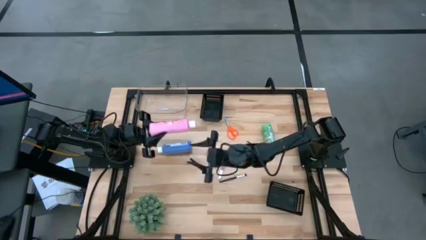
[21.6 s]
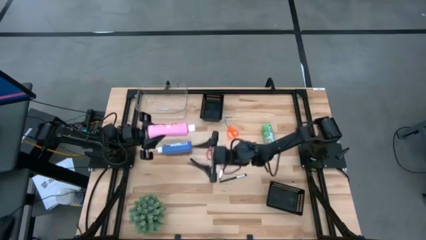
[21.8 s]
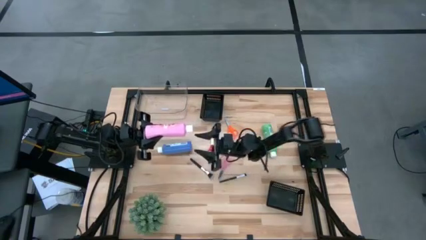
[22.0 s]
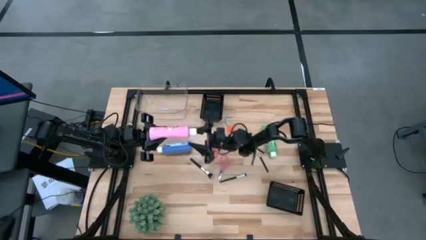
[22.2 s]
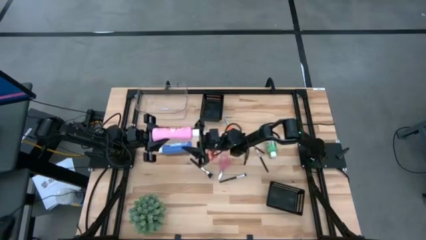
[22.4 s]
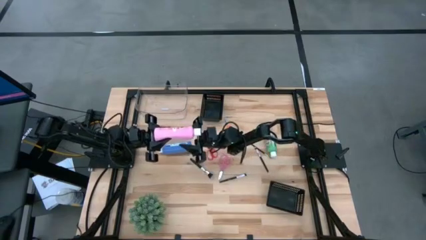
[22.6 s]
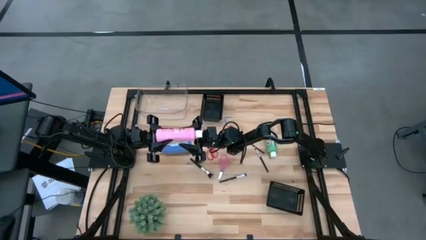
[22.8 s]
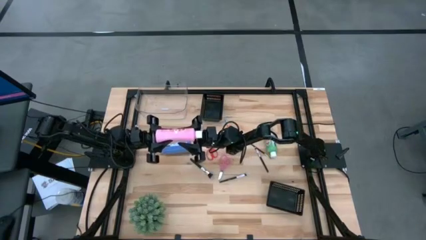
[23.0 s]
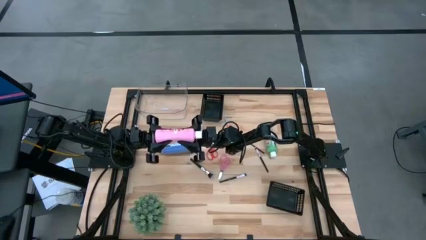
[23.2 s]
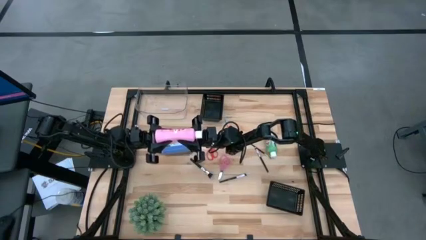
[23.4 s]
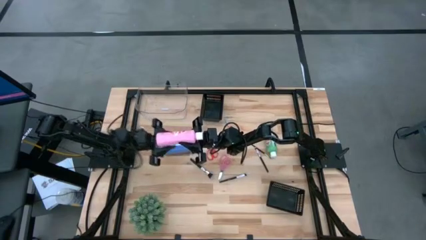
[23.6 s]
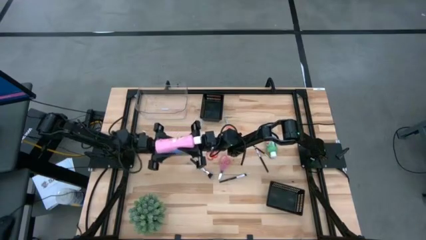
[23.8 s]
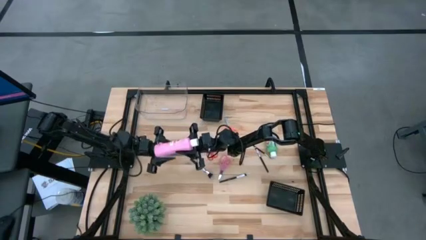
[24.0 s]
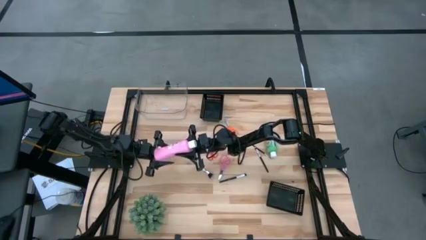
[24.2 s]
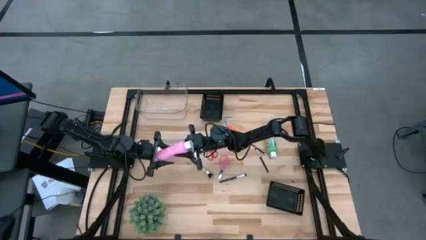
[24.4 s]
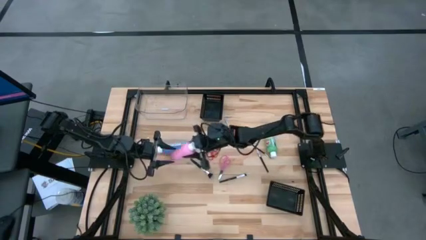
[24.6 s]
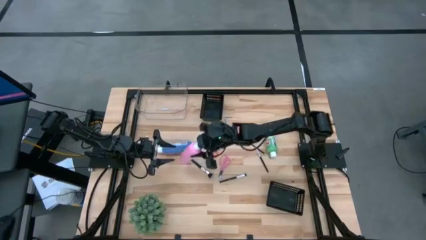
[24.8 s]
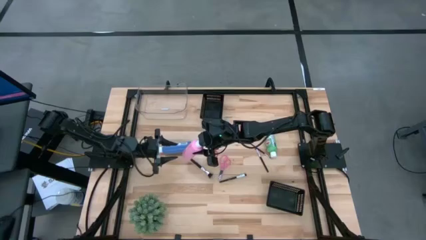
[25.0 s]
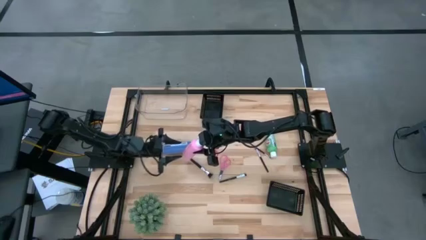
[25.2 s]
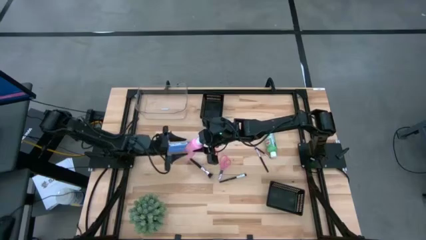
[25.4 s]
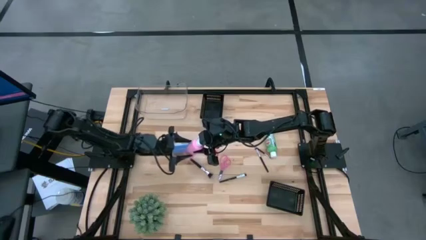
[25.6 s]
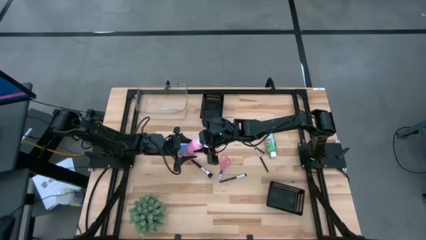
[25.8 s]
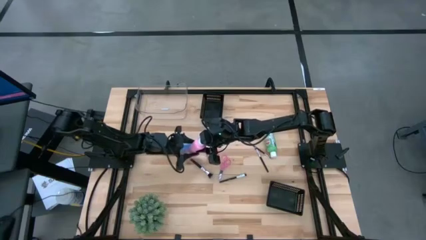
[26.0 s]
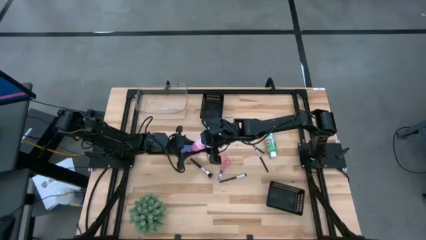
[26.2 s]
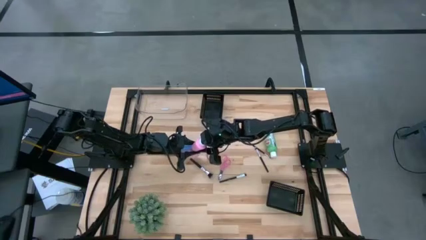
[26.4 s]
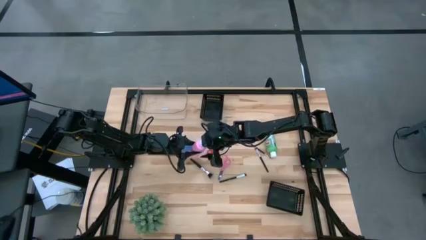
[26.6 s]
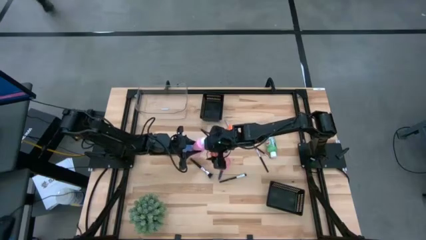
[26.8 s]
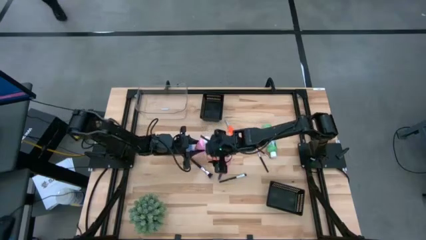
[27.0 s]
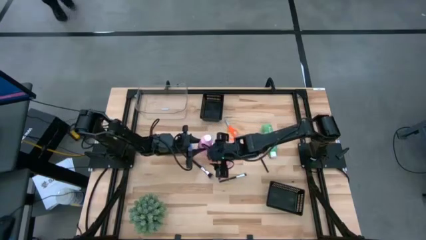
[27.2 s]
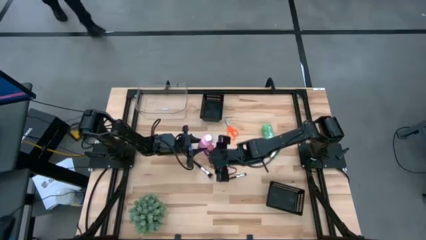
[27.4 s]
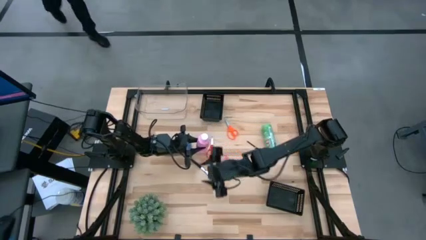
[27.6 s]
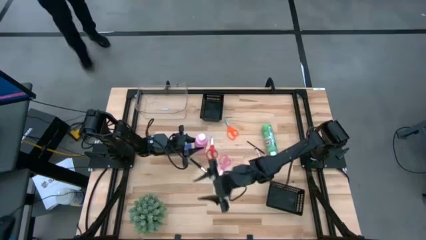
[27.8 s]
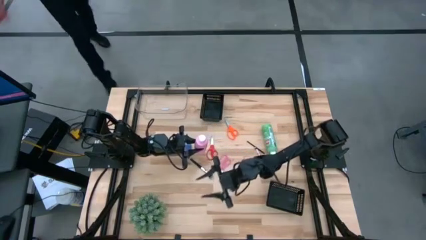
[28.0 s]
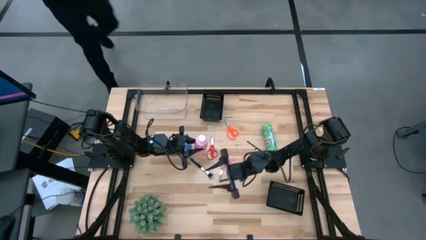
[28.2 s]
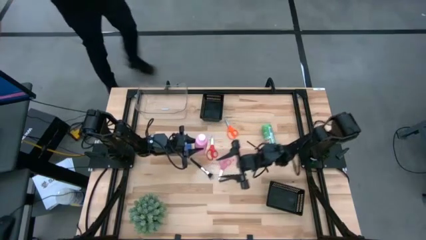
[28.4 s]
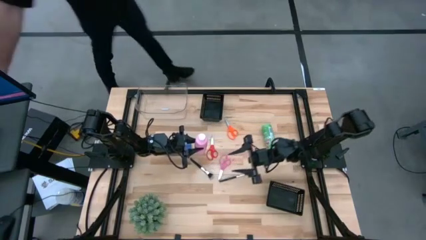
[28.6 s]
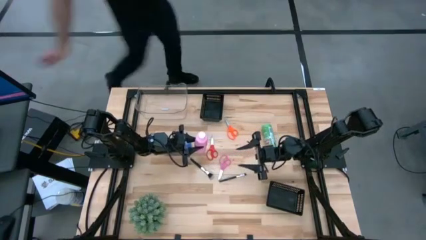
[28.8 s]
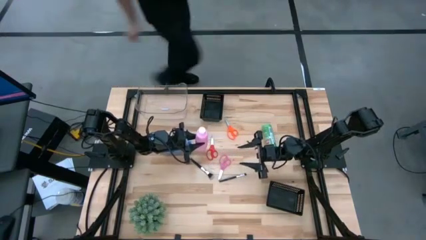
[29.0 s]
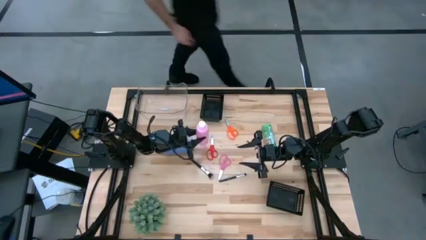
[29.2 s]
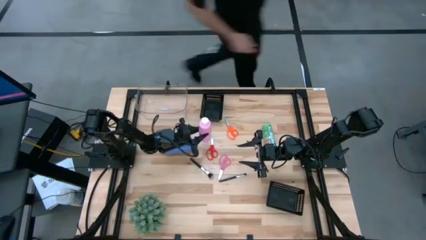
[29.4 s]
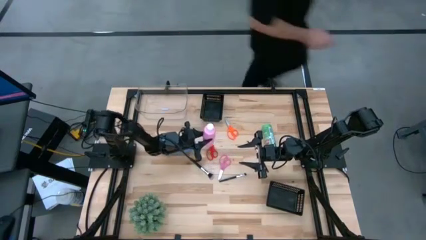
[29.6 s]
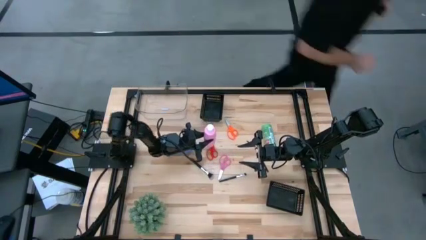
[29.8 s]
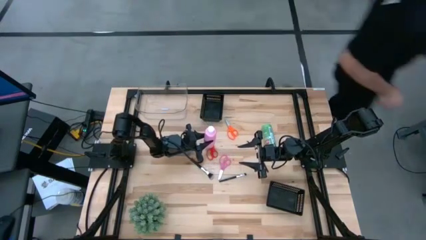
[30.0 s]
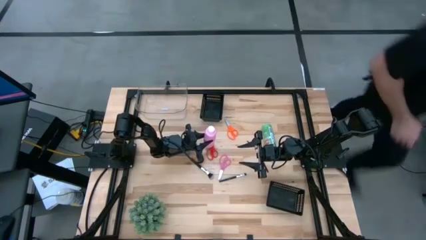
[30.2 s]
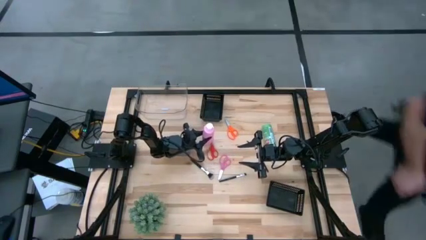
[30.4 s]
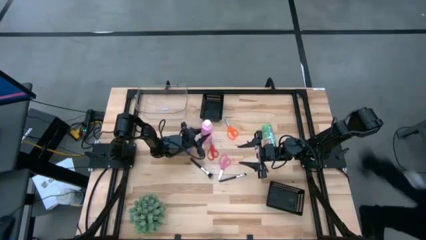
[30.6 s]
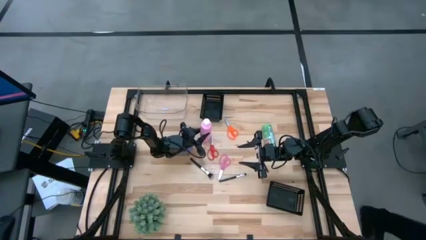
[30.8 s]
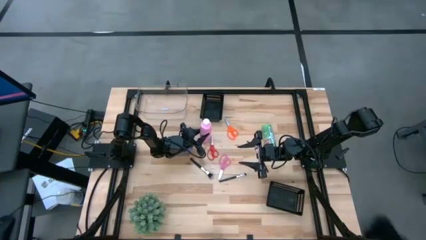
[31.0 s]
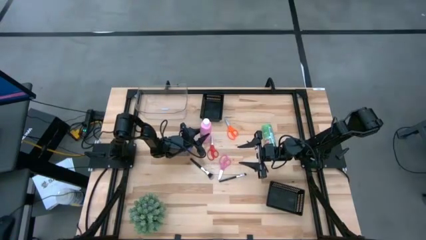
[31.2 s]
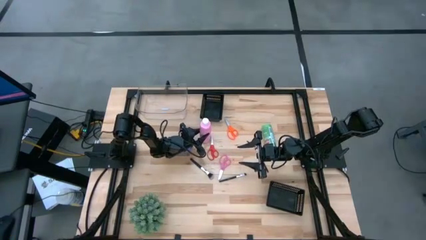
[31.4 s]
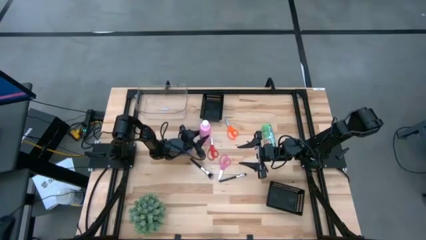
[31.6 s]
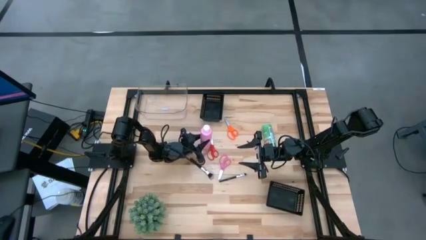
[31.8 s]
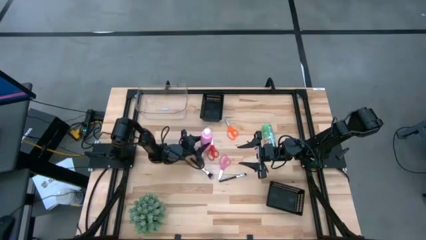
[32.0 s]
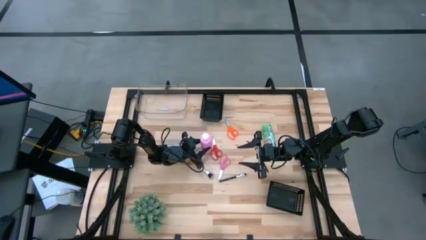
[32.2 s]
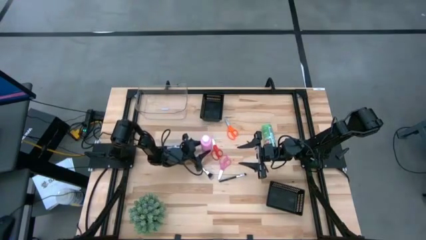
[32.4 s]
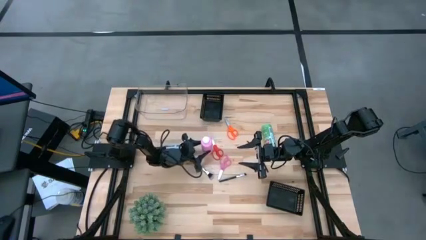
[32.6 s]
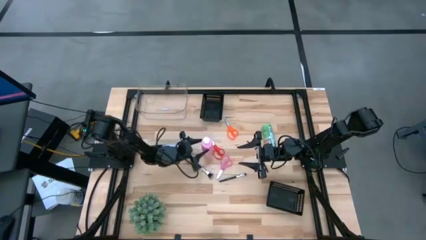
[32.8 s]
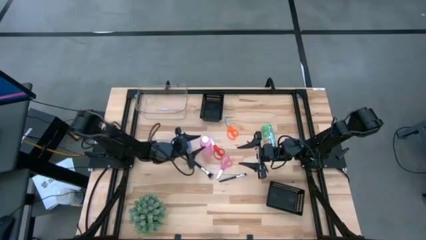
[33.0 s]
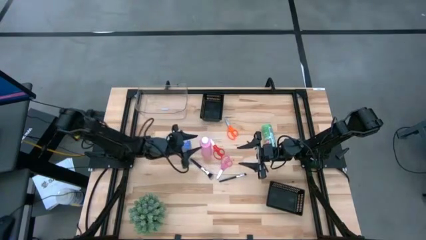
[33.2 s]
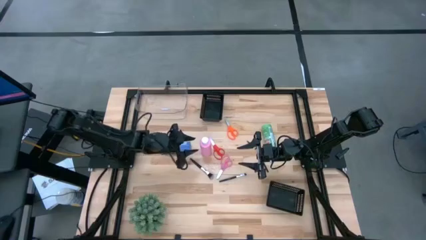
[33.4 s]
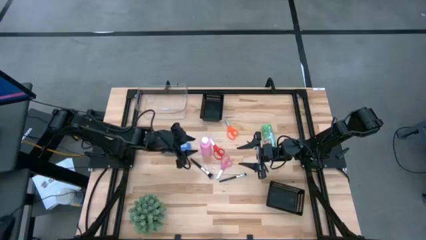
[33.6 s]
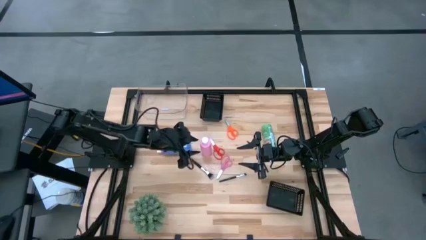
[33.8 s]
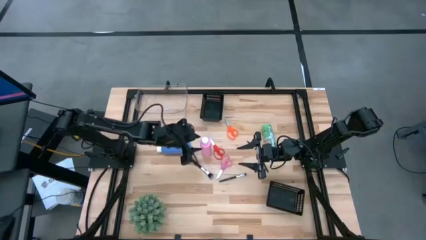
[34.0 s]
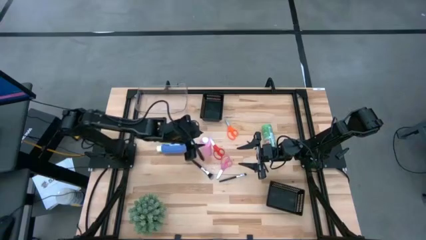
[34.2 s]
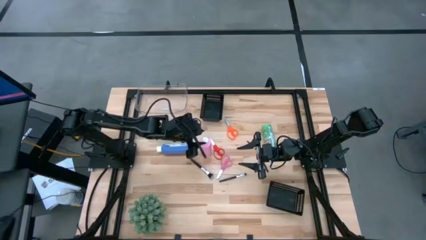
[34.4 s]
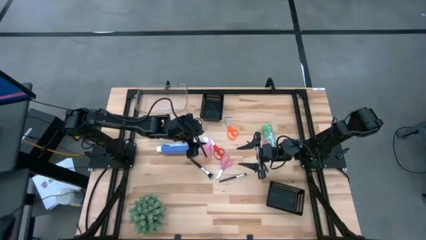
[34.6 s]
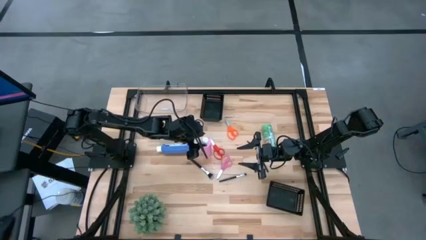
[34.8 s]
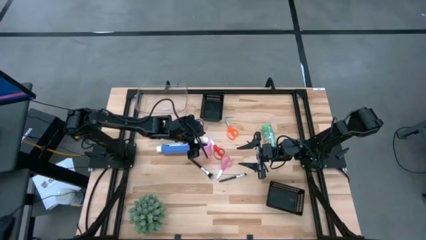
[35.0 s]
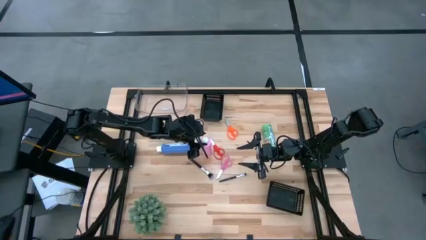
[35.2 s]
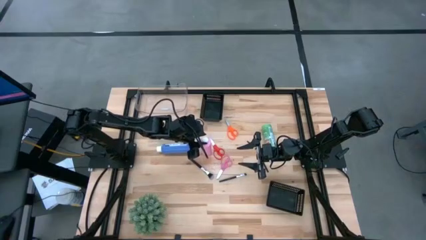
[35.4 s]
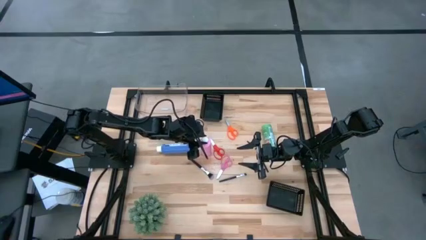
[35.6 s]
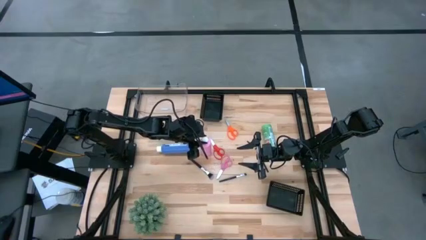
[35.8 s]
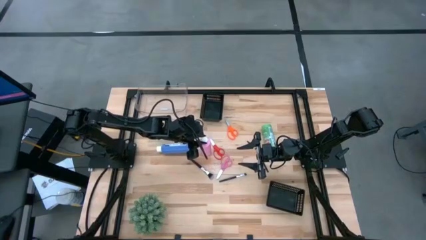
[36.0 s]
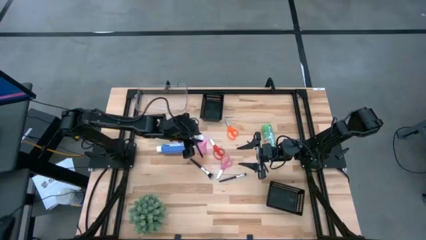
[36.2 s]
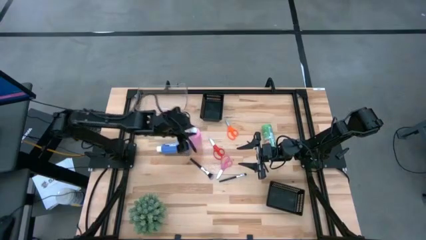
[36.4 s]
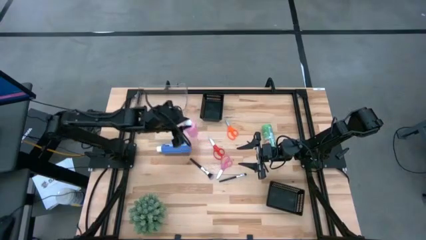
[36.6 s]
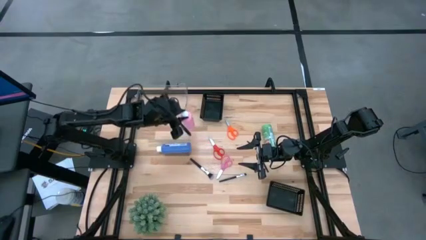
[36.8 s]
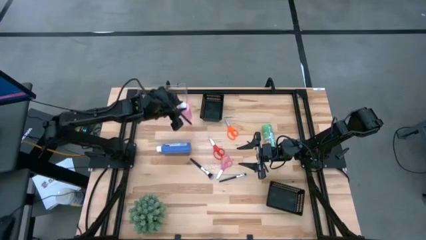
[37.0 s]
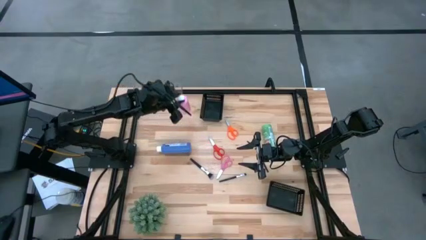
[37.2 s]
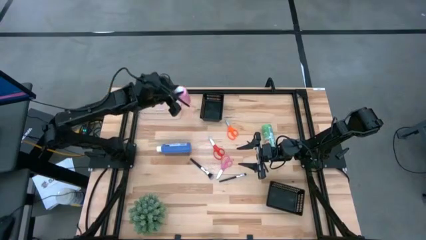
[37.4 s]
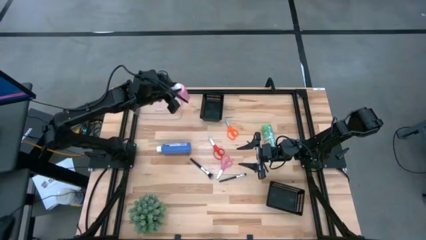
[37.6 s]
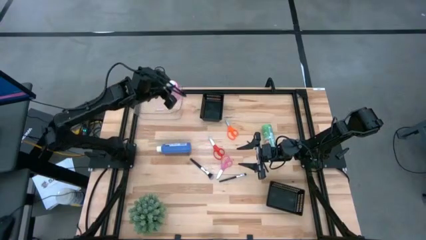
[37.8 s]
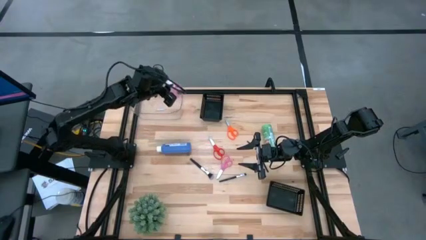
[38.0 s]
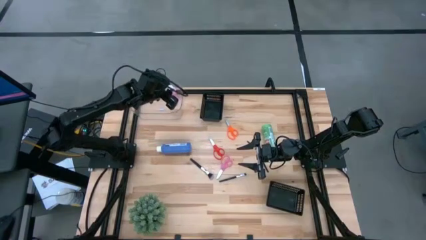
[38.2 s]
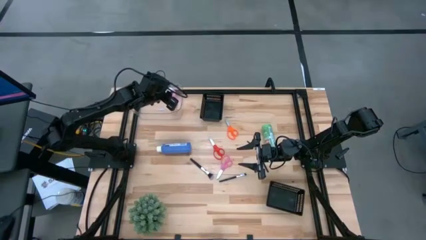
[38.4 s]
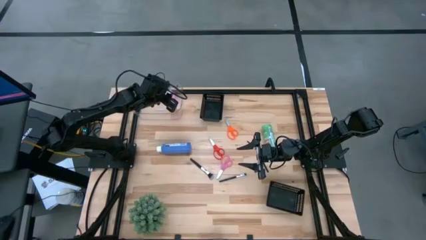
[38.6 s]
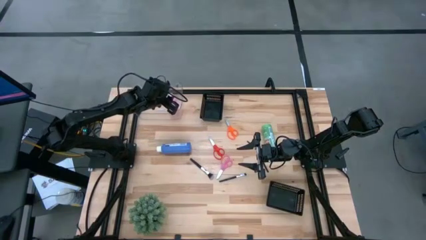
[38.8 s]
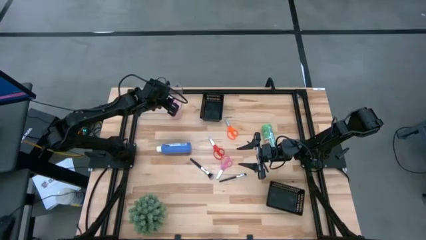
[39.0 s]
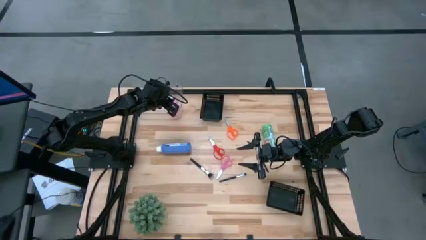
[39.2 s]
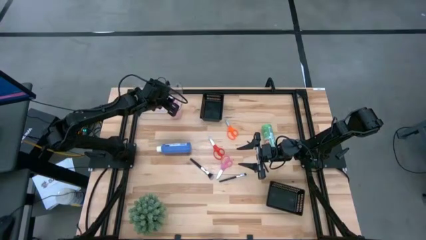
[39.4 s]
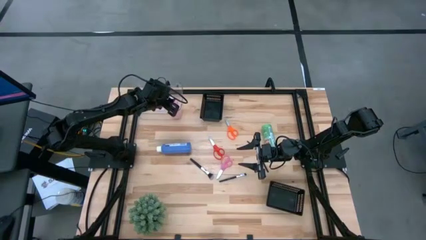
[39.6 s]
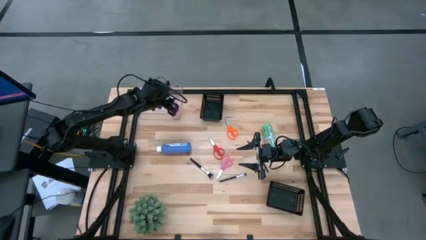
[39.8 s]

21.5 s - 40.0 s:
Task: Pick & Place Paint Supplies
Put the pink paint bottle into the transparent bin
